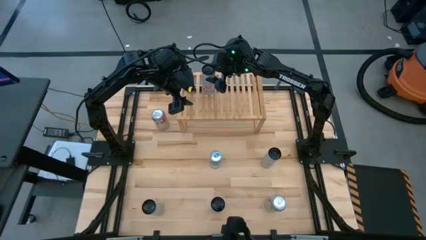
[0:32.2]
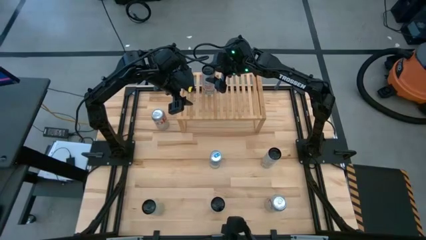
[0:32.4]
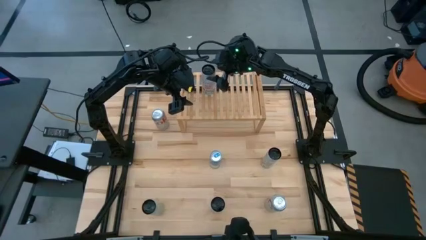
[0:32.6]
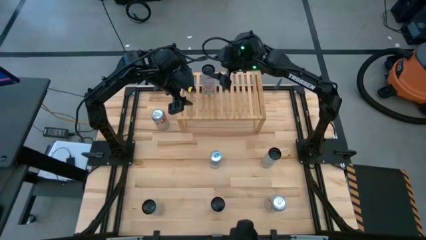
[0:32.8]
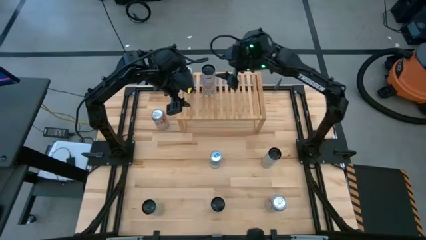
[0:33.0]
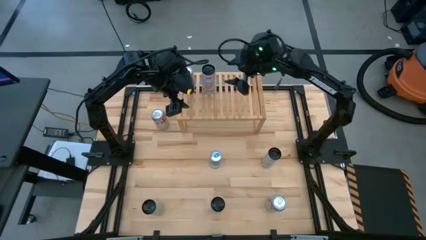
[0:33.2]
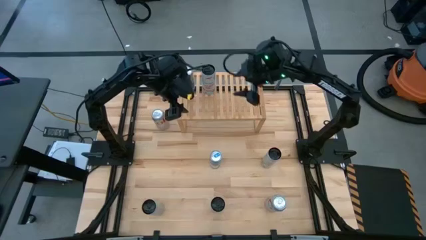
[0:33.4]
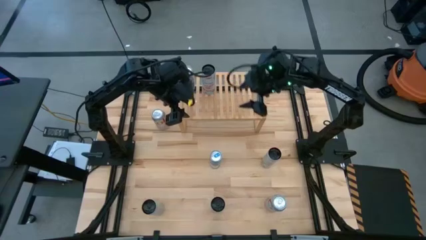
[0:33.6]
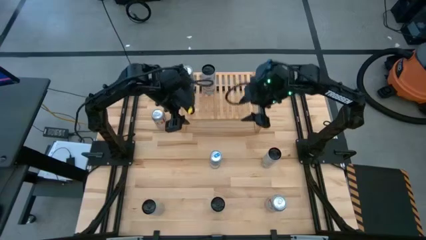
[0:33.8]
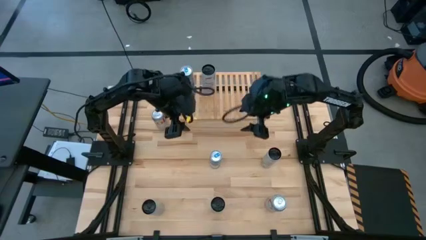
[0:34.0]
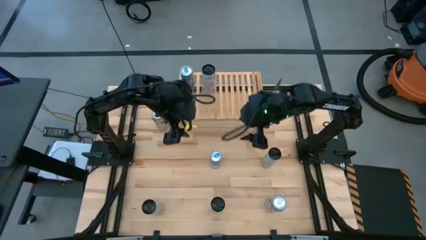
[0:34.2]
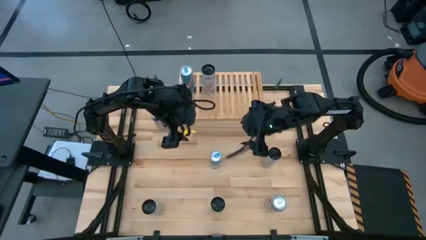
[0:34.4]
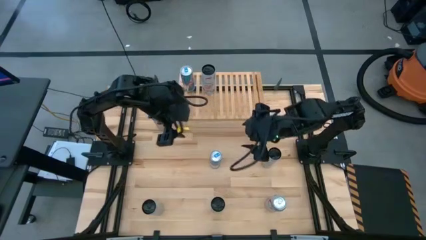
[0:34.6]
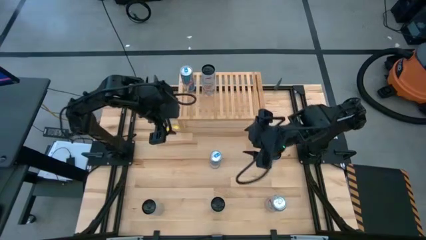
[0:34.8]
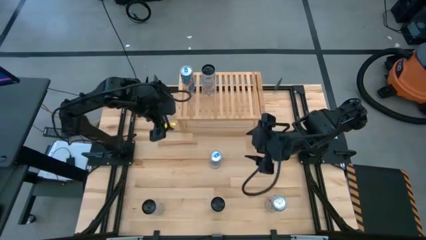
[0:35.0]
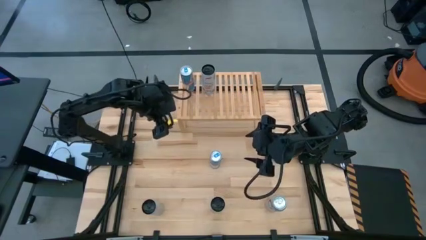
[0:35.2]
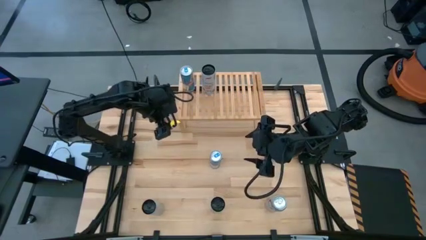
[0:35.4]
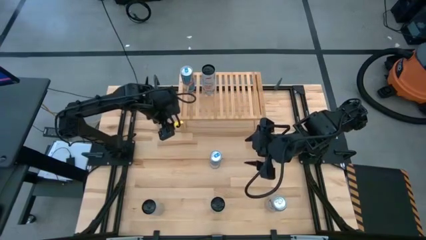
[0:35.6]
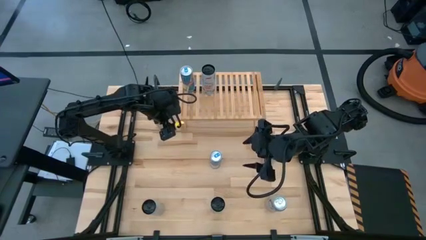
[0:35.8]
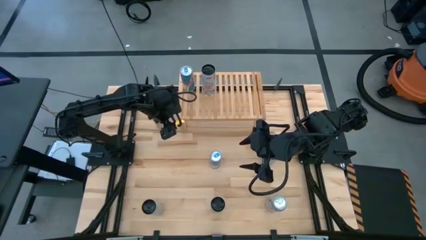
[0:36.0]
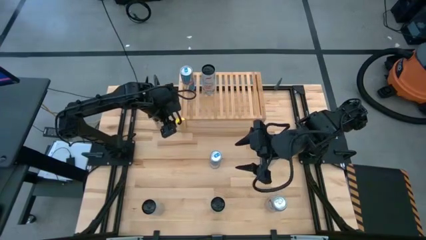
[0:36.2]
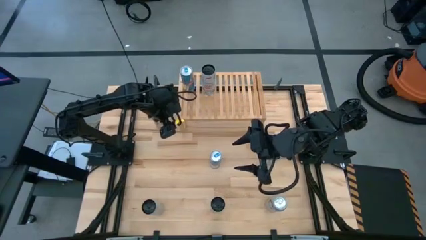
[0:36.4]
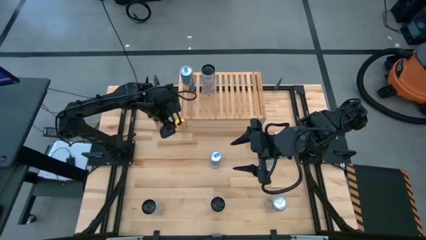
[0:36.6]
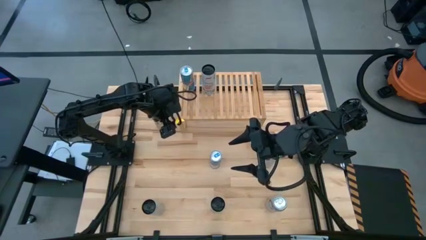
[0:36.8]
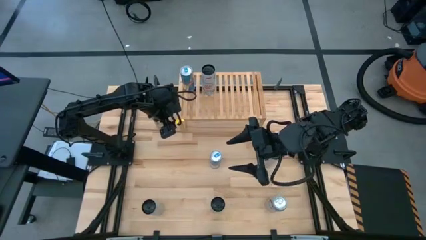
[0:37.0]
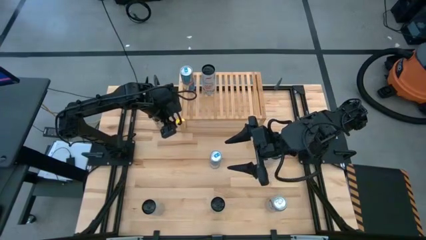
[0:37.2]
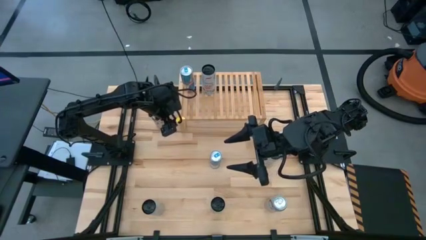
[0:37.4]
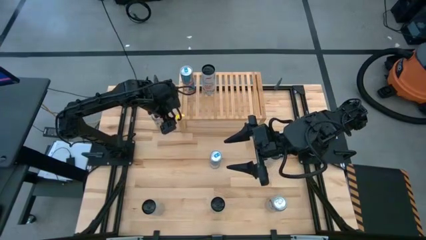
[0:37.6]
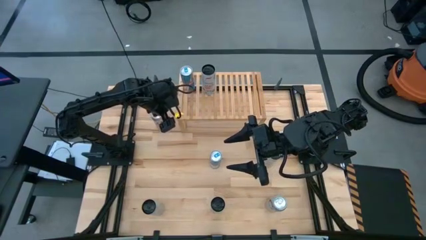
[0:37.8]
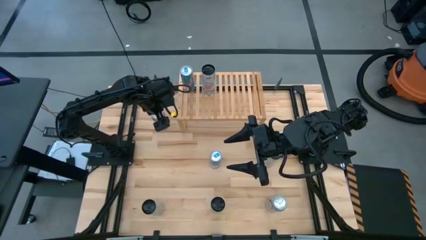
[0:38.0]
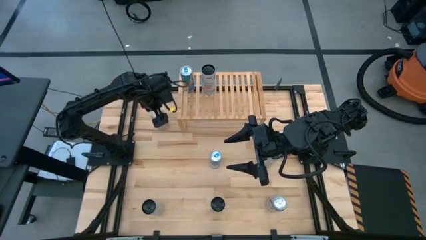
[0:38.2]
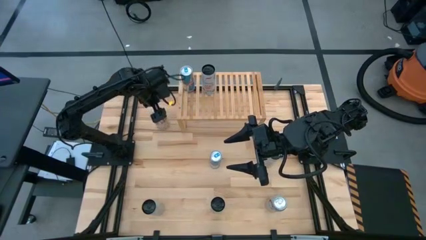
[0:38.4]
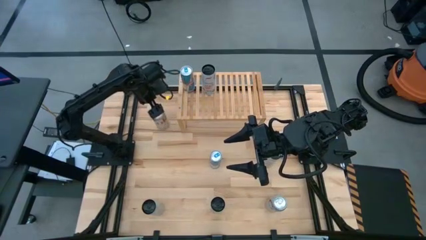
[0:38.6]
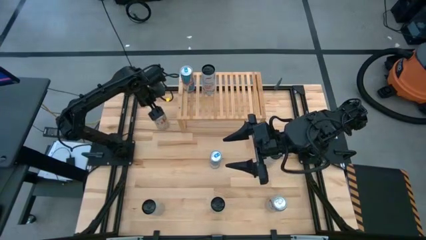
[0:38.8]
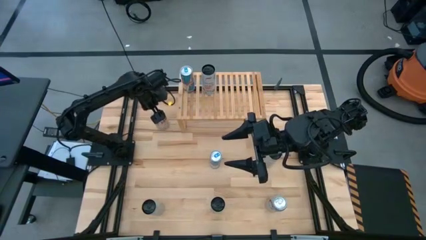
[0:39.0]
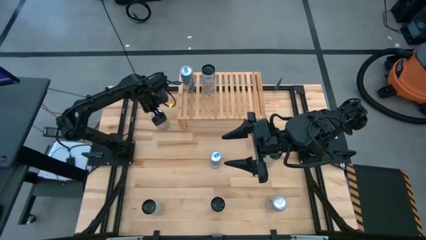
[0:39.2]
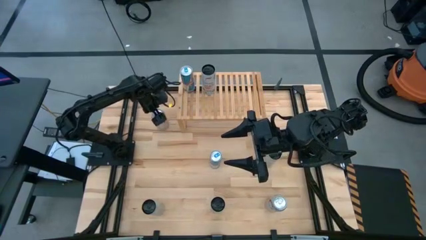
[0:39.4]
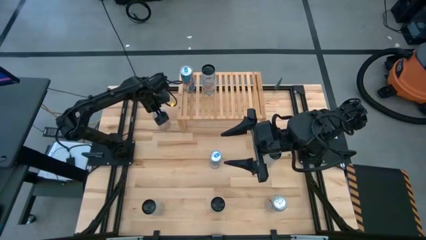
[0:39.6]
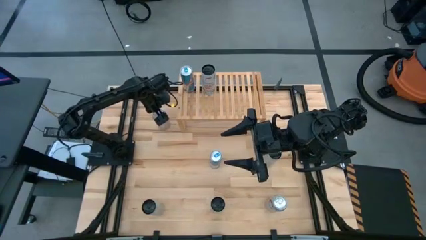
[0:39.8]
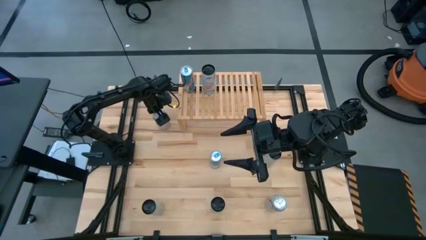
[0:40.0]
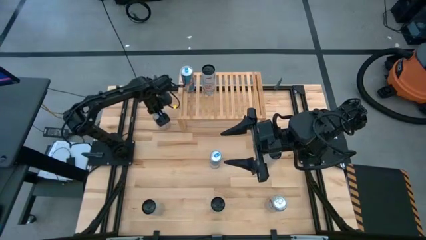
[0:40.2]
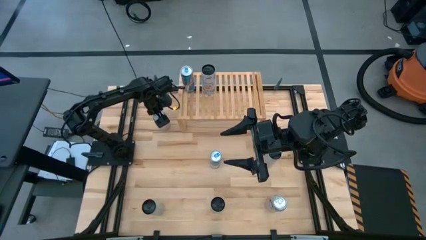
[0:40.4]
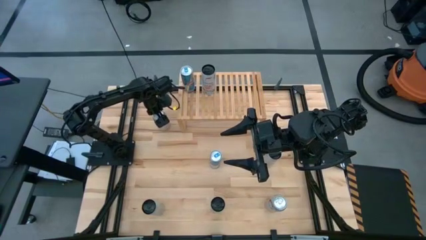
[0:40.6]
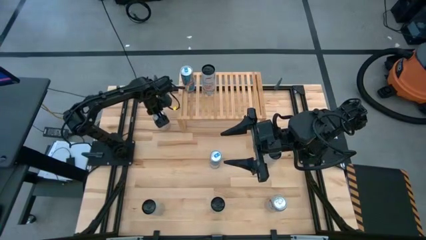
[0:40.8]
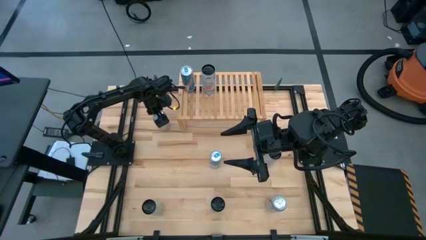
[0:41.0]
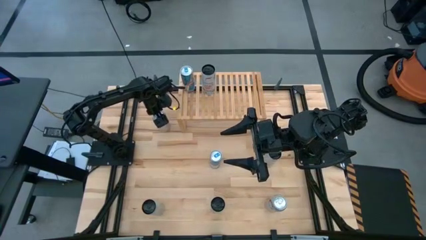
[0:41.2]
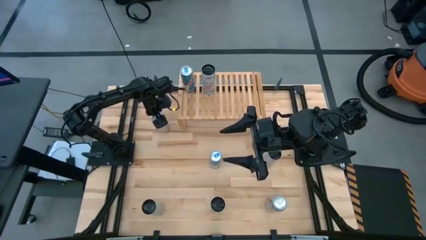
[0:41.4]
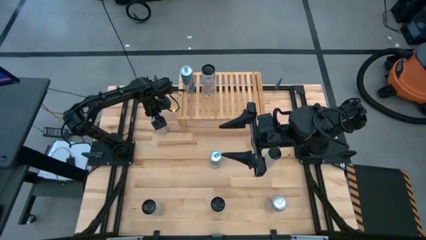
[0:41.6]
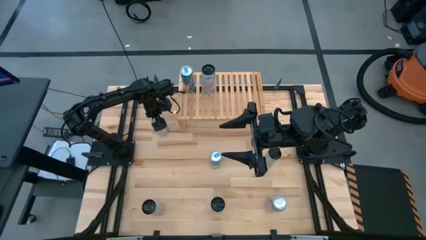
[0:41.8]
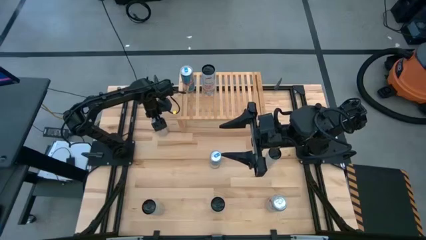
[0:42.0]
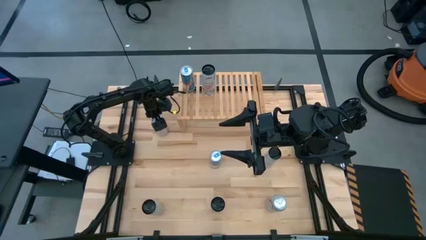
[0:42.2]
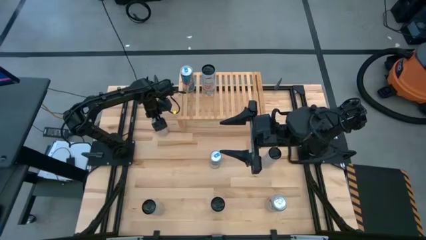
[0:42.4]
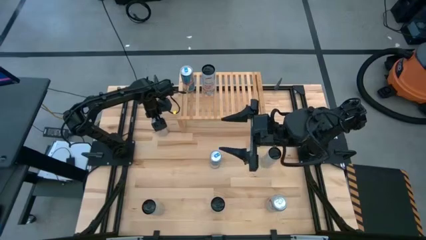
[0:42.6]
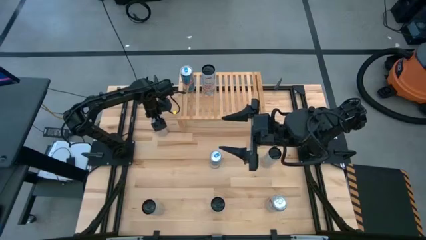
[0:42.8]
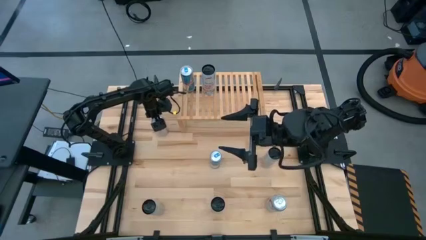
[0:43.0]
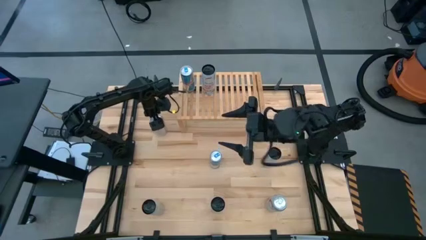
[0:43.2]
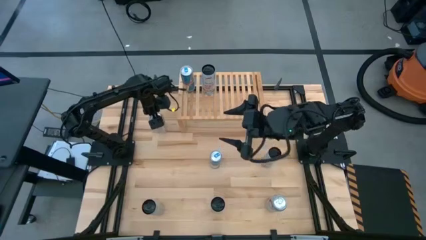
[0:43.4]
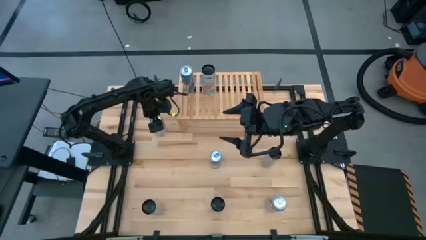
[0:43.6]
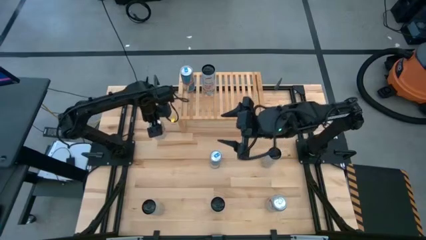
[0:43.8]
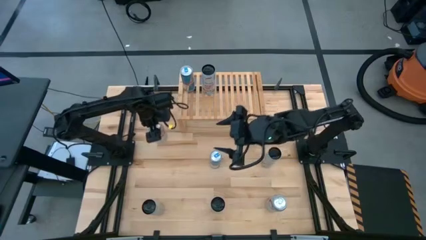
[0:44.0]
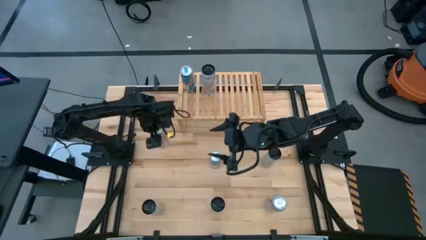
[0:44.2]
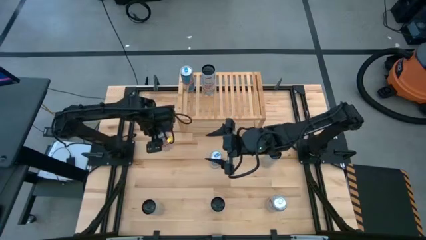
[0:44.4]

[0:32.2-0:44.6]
Task: Place canned beverage on shelf
Put the top silver soda can on the shelf

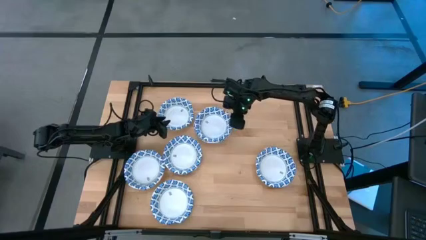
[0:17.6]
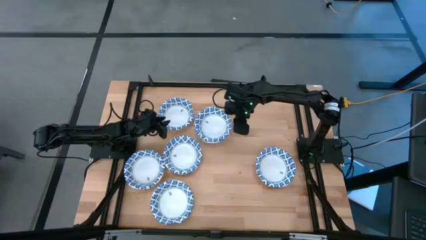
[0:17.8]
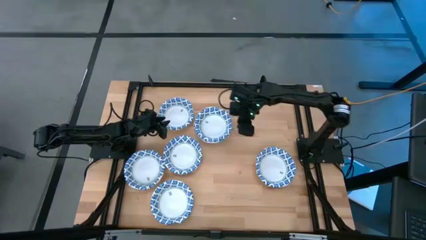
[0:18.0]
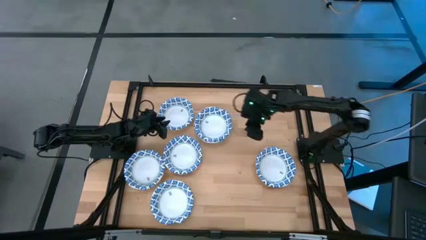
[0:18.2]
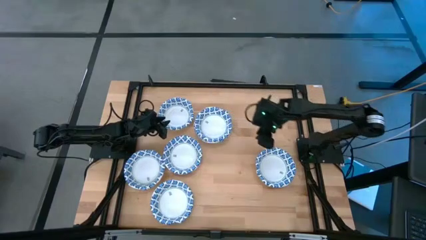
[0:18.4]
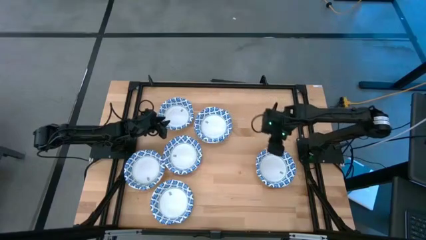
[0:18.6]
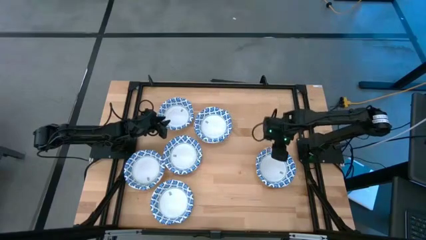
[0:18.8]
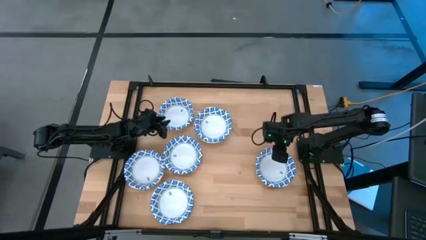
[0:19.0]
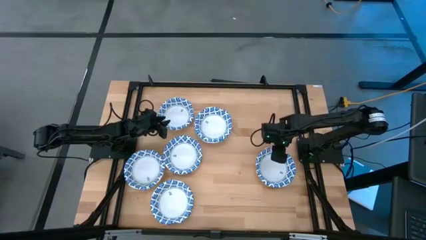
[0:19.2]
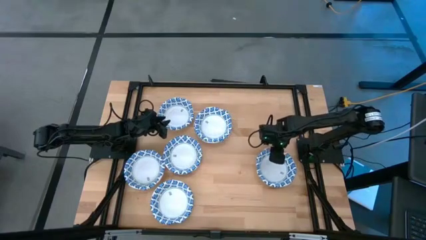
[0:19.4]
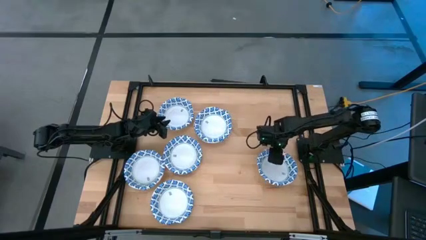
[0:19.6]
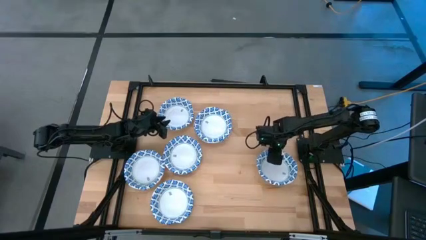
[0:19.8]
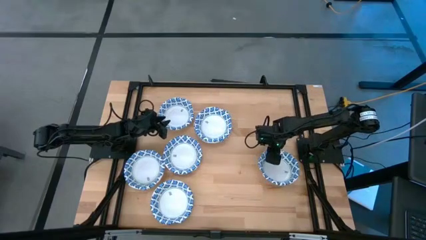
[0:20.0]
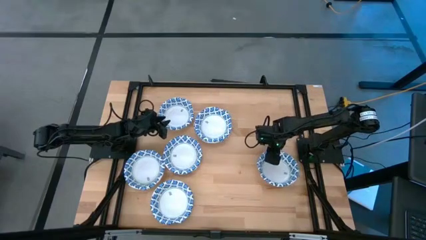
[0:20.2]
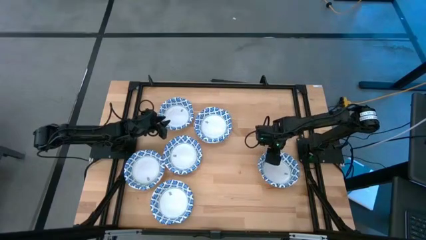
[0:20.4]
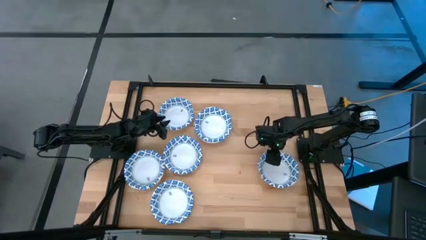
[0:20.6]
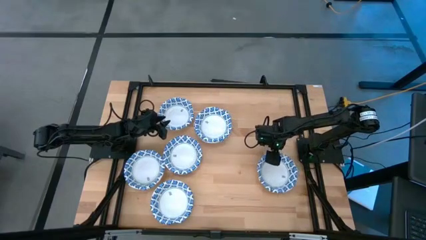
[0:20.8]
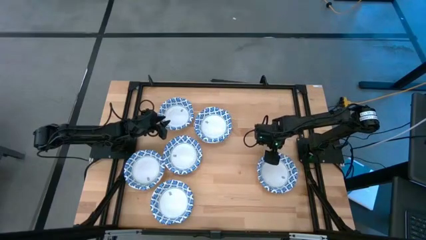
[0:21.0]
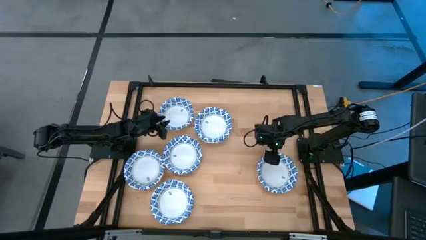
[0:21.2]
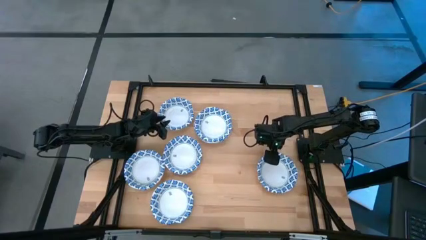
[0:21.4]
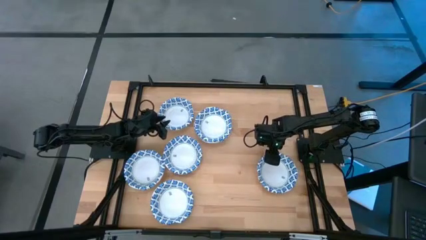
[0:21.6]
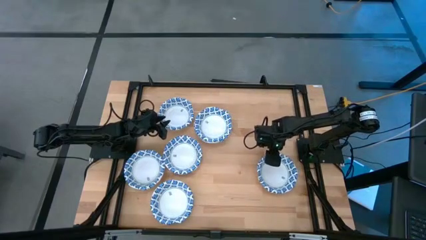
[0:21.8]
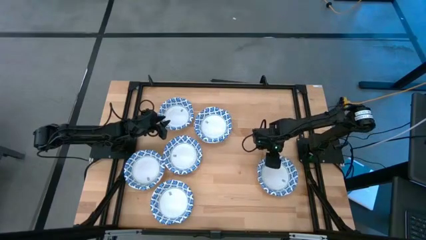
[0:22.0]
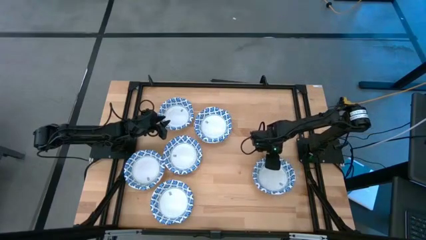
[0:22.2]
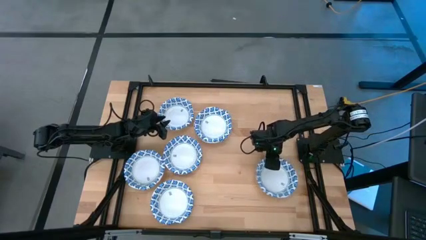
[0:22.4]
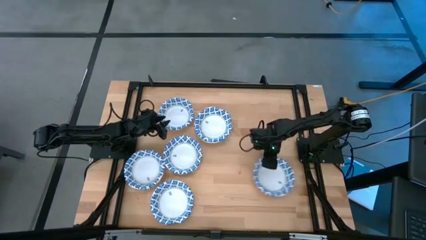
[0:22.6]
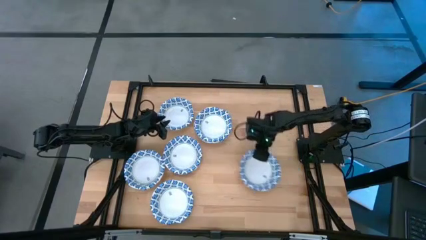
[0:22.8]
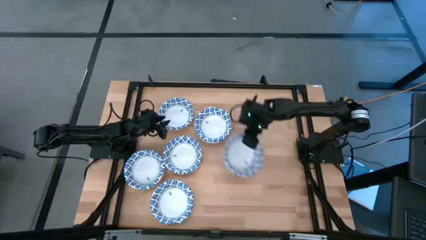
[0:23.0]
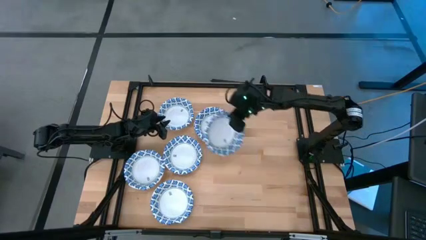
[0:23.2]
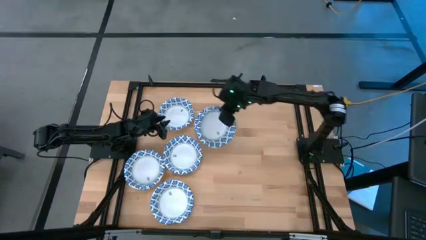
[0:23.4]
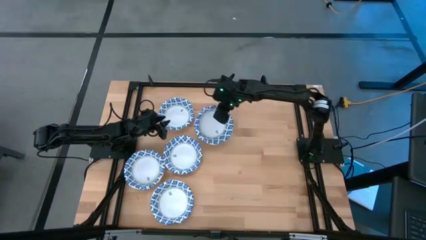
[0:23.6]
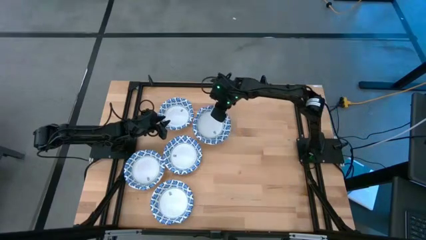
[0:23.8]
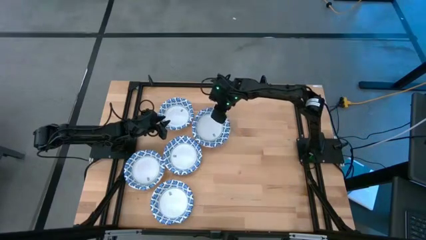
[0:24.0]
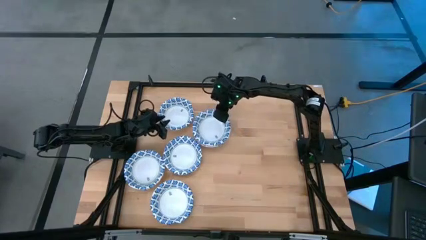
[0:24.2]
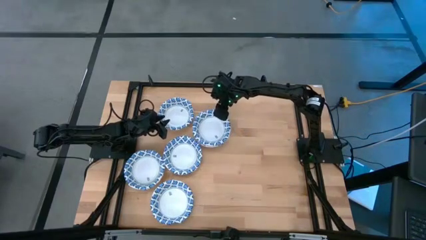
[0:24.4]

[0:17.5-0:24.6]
Task: Nest bowls inside each other
Stack the white and blue bowl on the white and blue bowl on the table
